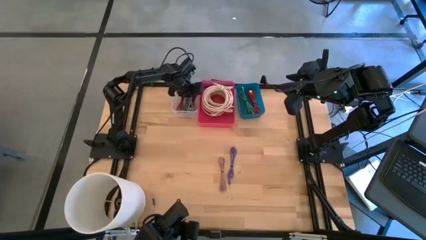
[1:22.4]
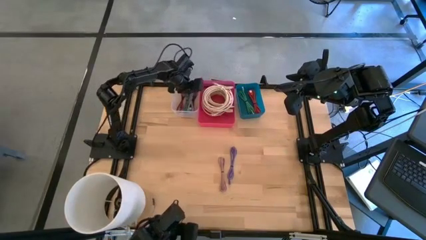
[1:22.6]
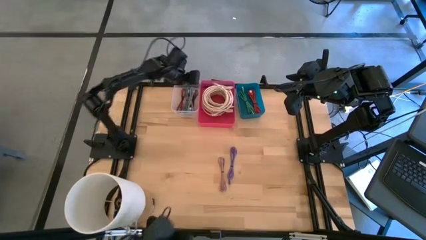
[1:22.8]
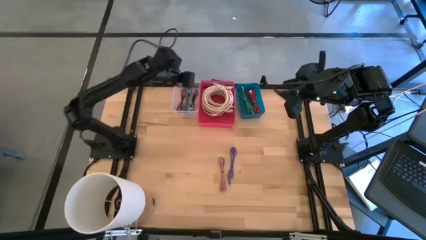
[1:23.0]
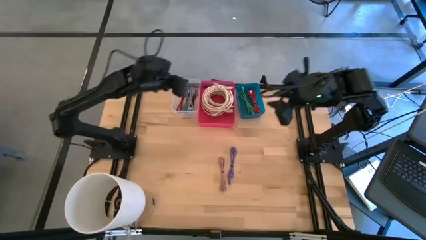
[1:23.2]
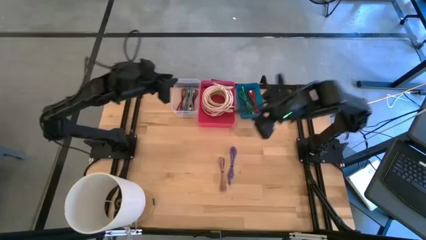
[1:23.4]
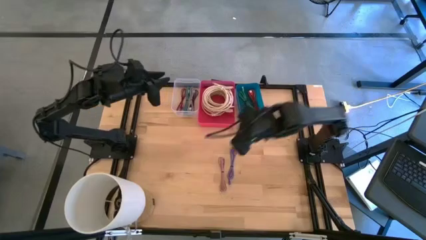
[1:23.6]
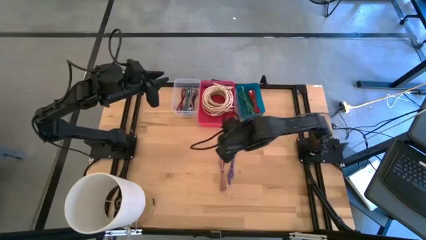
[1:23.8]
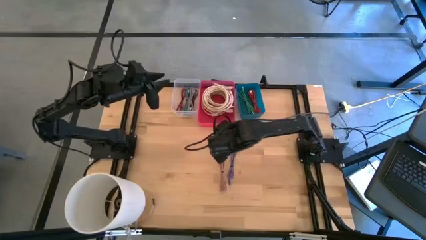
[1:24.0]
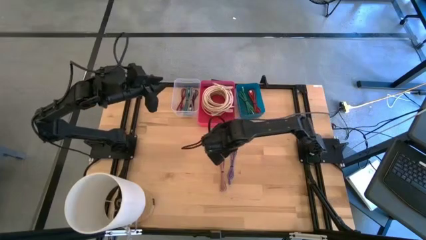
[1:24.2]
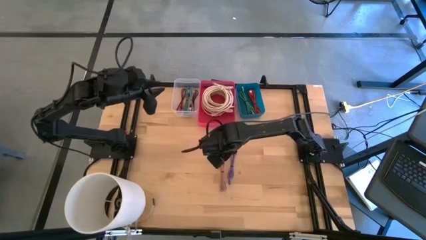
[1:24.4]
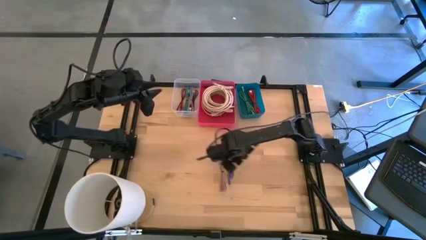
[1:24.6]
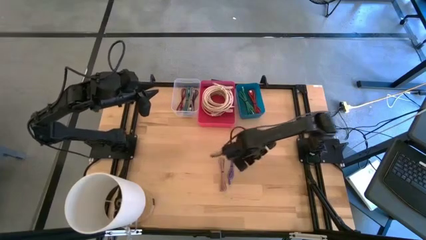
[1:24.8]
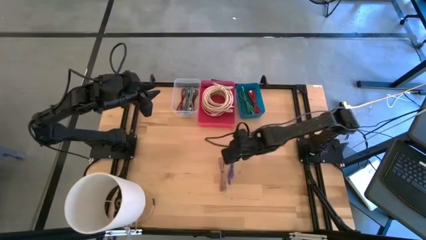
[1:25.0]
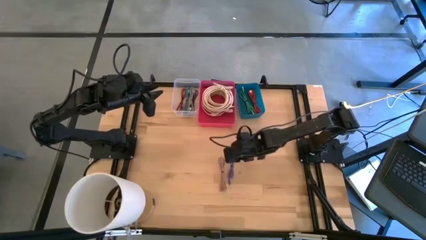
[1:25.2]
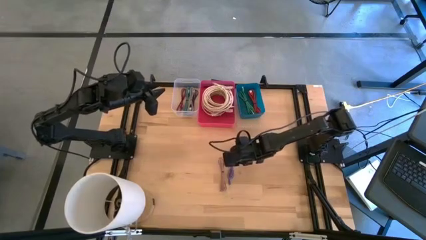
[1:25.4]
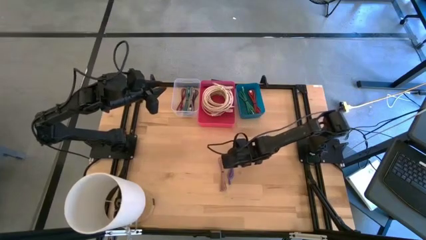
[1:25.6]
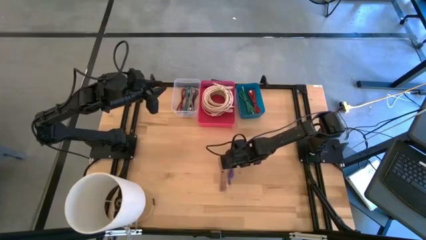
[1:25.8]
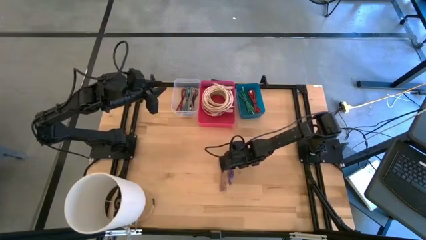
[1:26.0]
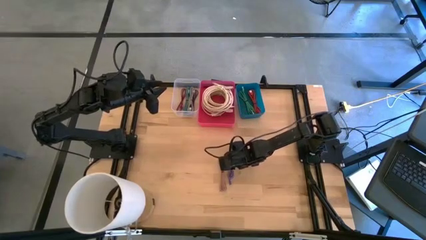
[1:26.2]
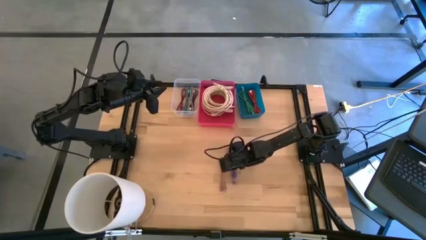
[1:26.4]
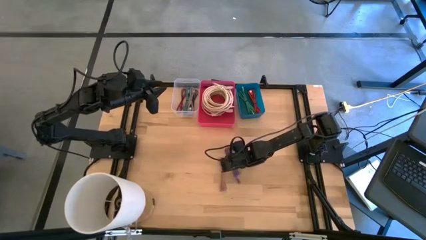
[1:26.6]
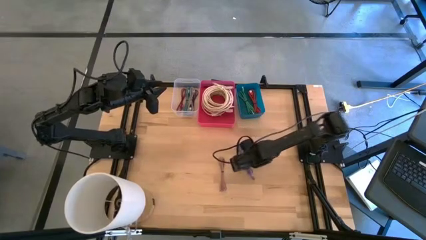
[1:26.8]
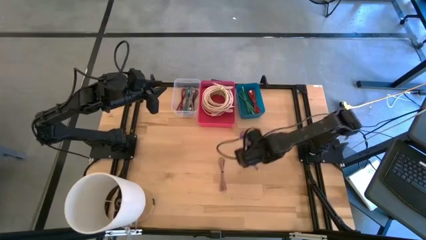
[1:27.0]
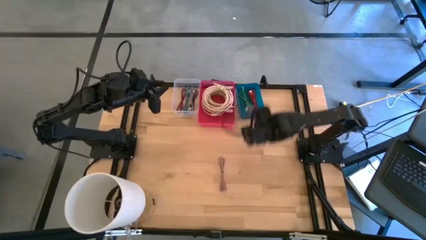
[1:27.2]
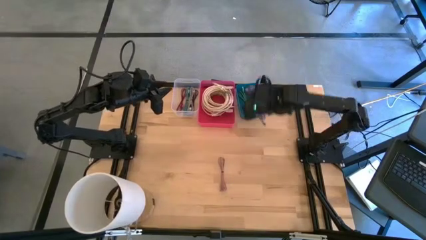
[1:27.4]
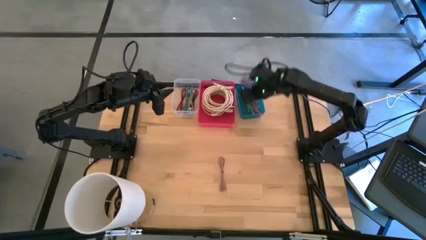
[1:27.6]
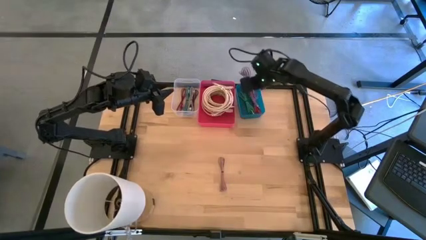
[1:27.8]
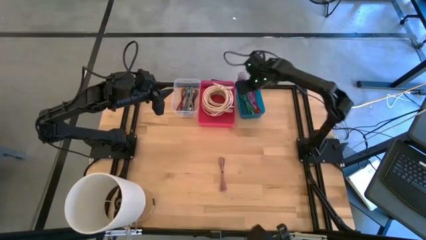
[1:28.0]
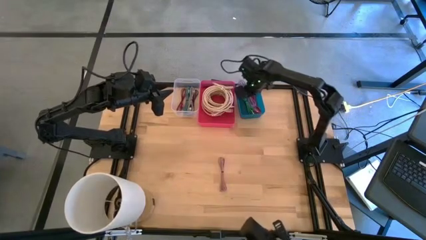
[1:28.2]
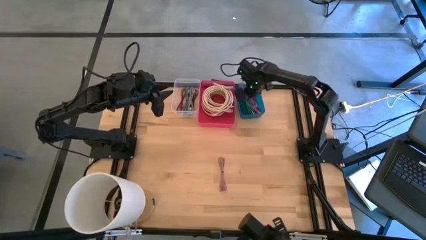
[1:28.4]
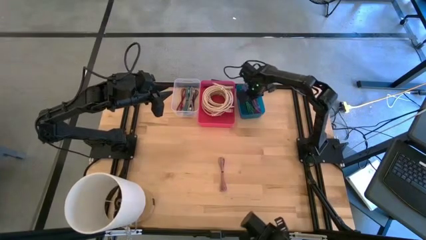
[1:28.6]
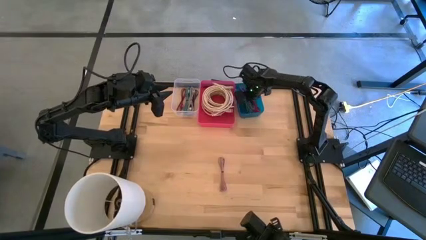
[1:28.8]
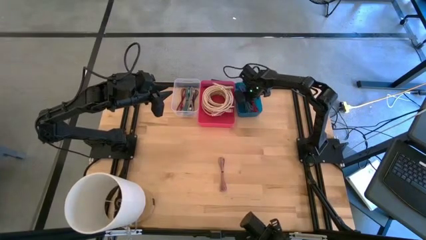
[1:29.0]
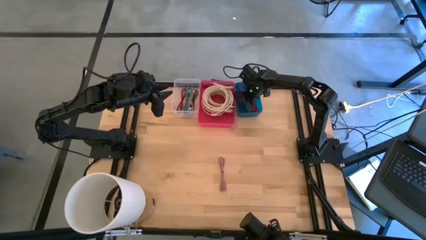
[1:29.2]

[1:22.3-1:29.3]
Task: Pick & Place USB Port
Put the purple charger cable into the blue bin

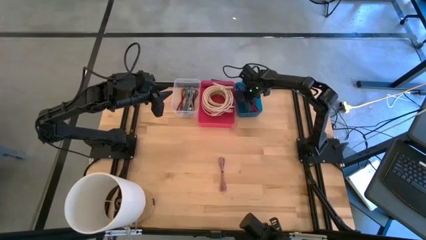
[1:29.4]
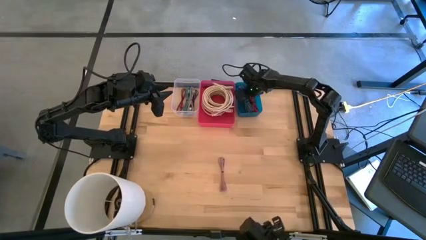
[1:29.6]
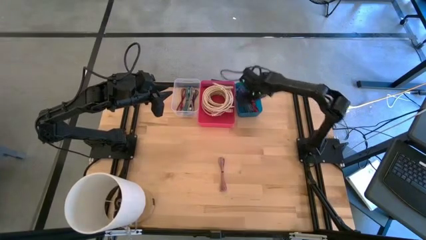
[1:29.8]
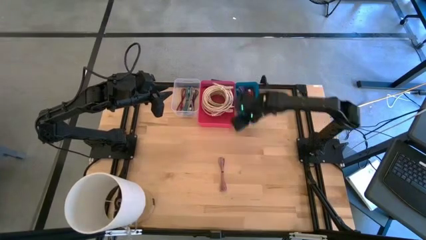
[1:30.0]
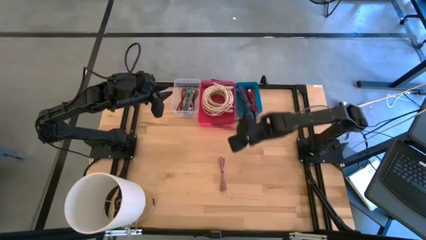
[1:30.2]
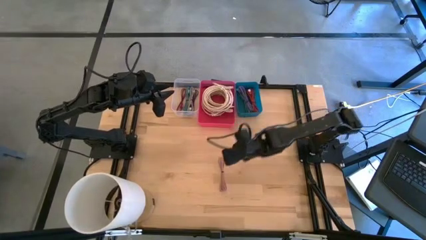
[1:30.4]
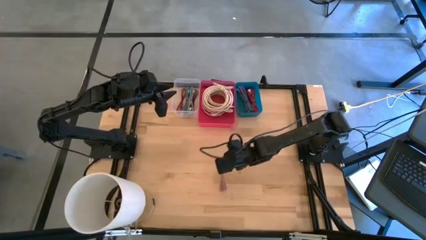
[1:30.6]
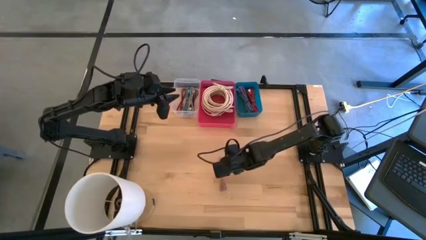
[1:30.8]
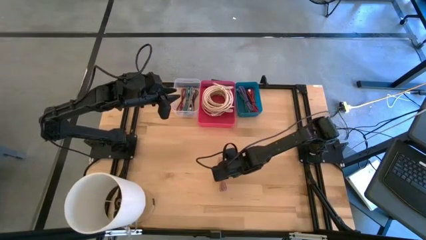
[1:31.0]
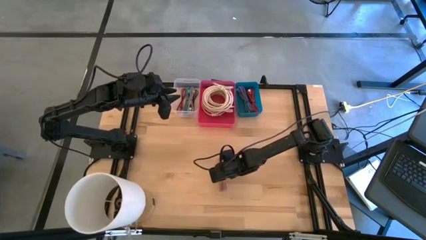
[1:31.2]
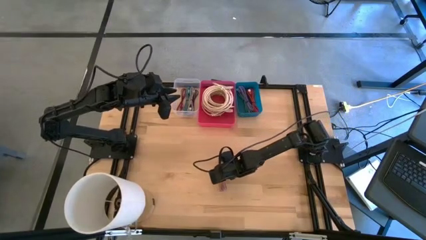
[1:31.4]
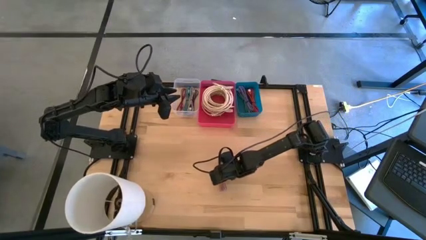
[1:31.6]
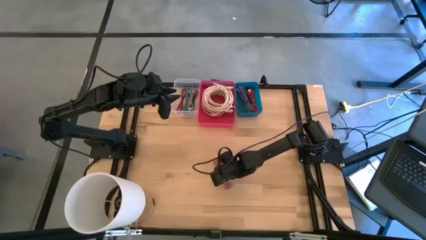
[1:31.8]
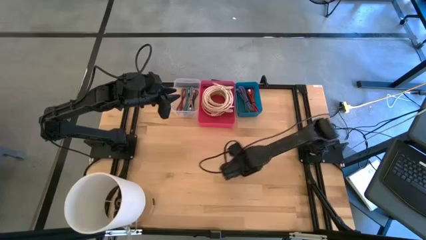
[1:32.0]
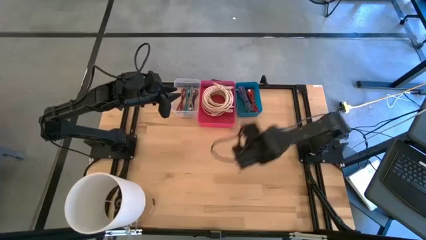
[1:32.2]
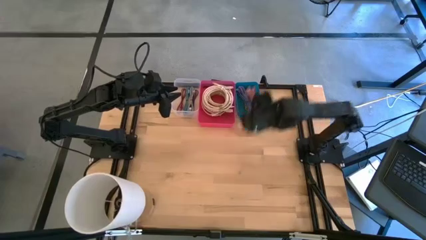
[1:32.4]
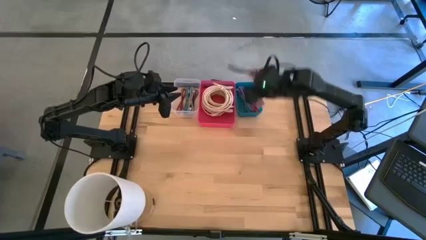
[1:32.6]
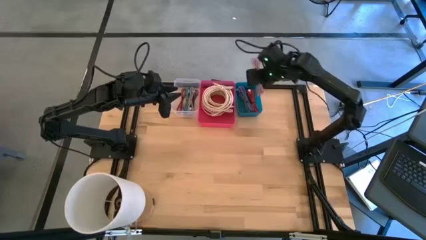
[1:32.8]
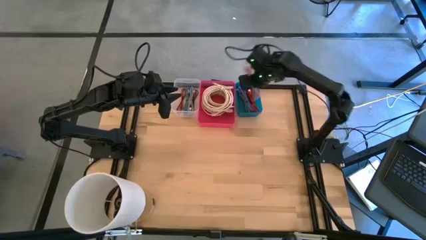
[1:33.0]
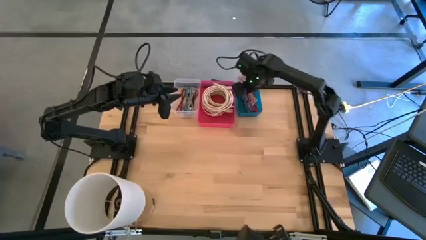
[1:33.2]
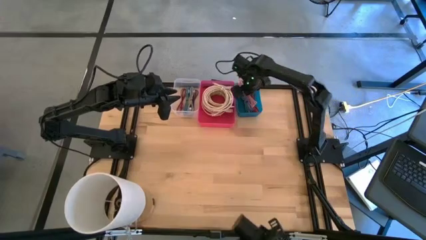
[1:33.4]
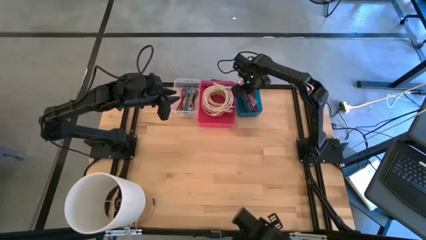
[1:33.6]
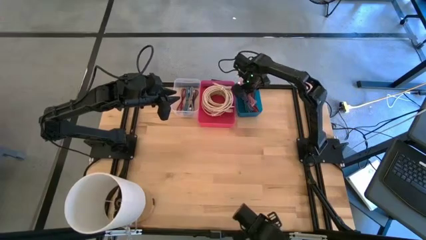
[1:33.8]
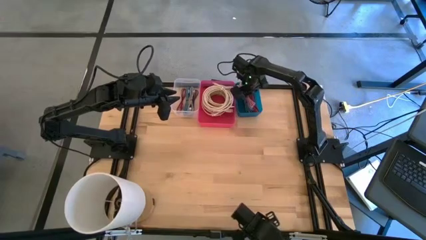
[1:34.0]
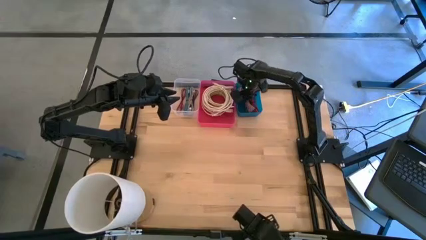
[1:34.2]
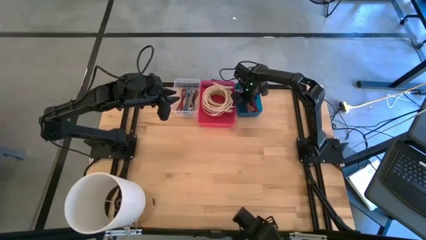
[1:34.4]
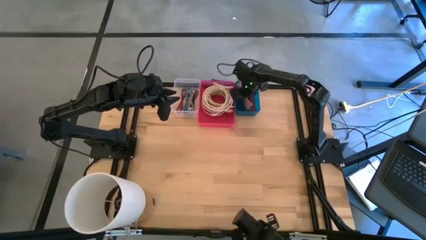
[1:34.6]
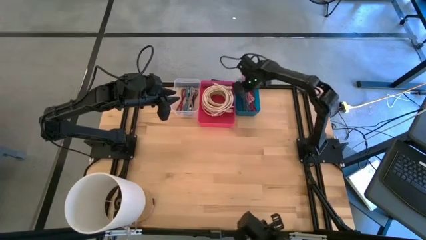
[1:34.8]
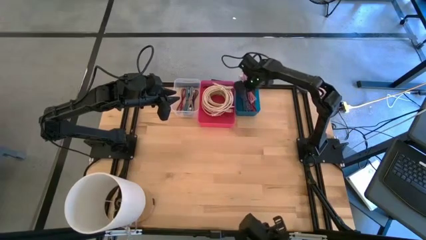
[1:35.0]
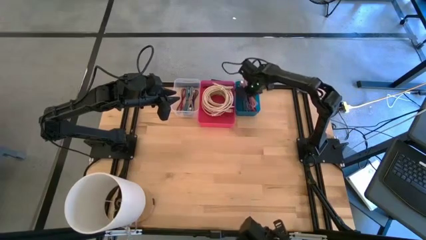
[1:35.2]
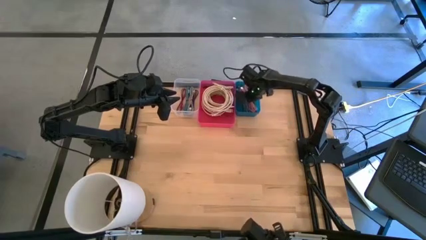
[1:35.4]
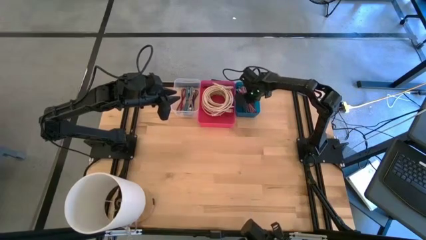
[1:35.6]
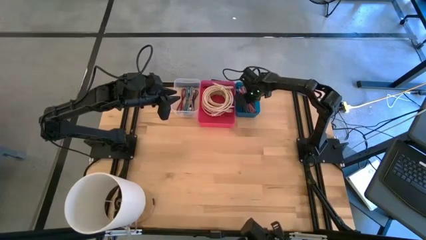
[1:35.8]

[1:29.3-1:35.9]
Put the pink charger cable into the blue bin

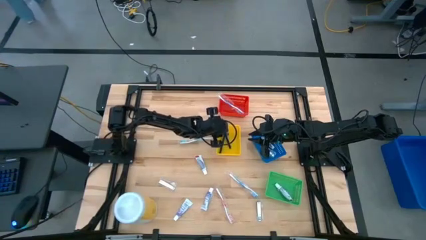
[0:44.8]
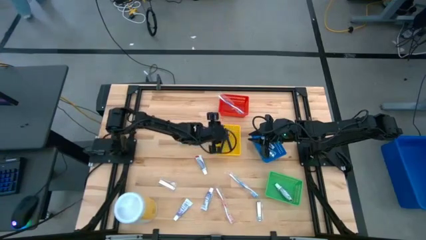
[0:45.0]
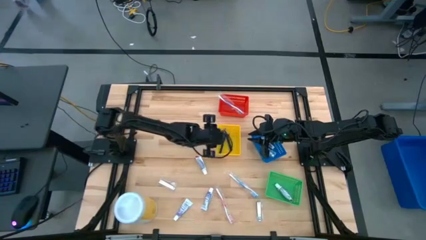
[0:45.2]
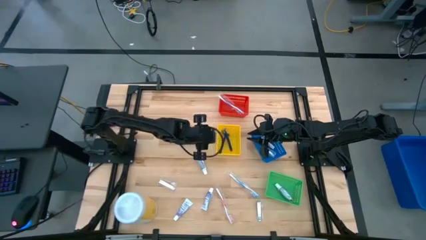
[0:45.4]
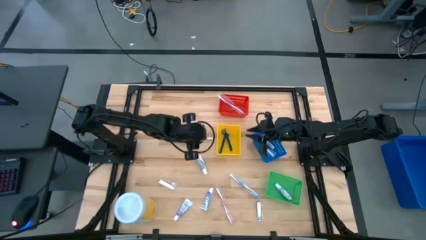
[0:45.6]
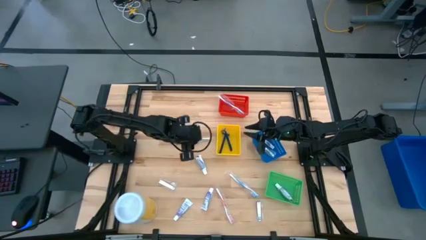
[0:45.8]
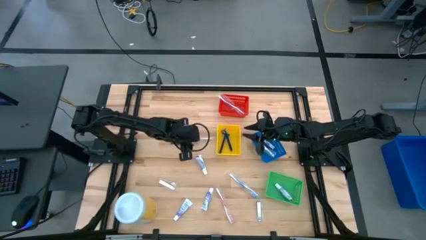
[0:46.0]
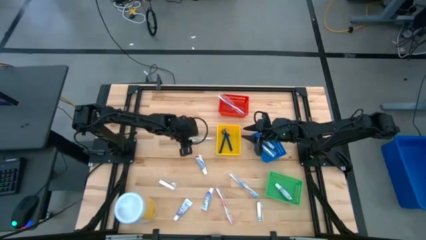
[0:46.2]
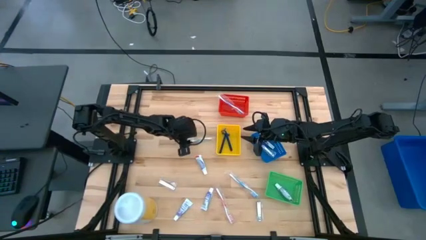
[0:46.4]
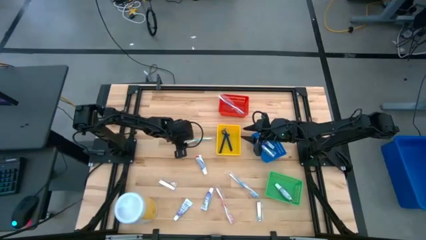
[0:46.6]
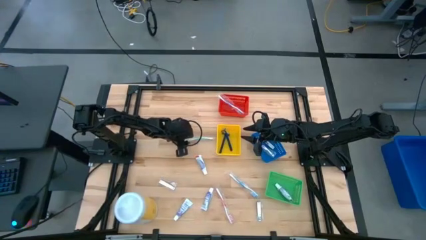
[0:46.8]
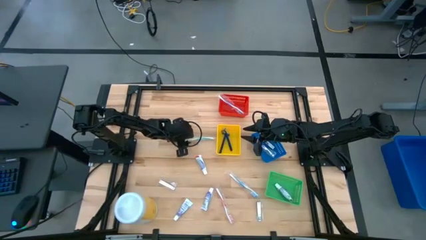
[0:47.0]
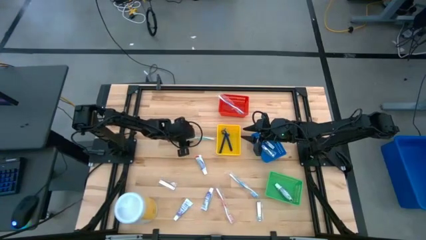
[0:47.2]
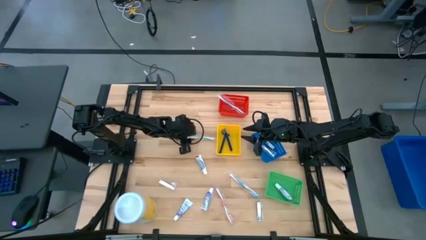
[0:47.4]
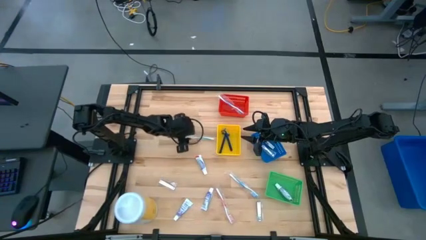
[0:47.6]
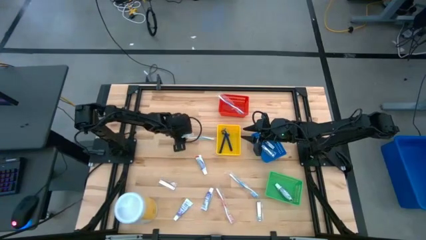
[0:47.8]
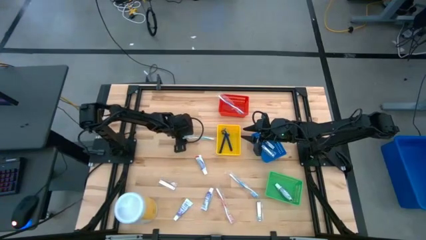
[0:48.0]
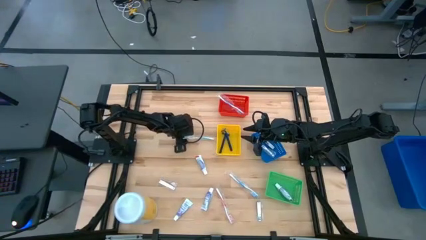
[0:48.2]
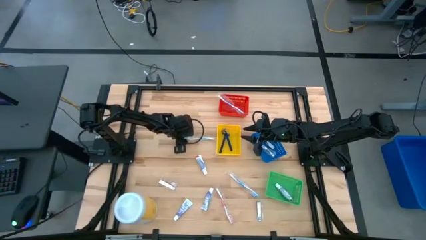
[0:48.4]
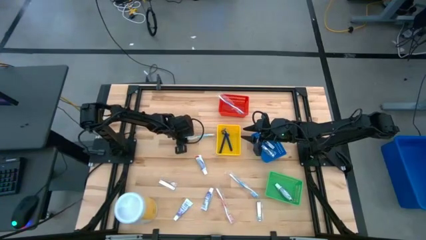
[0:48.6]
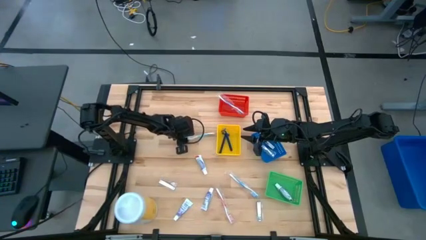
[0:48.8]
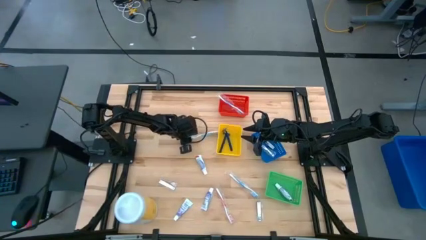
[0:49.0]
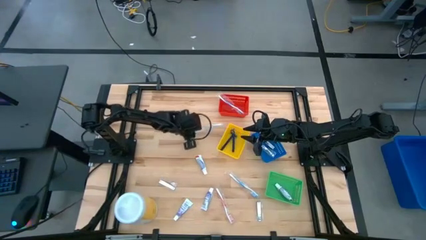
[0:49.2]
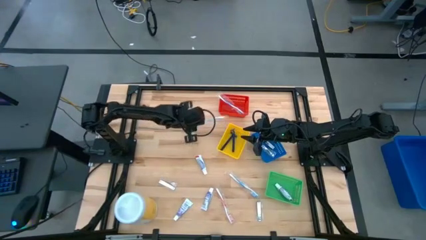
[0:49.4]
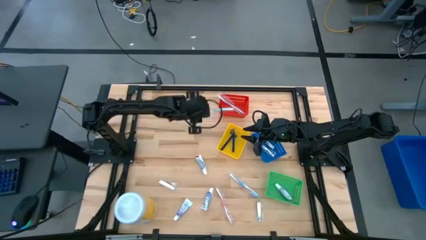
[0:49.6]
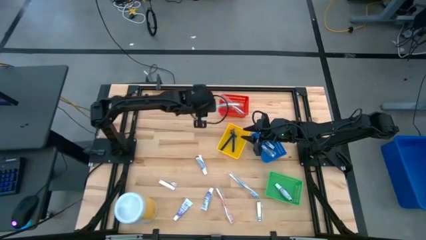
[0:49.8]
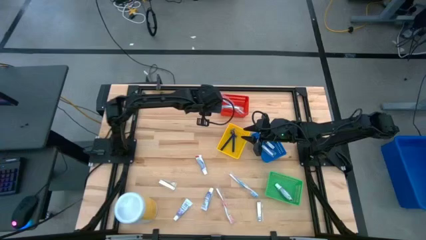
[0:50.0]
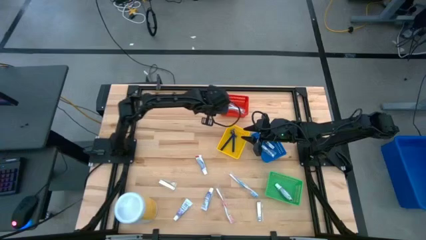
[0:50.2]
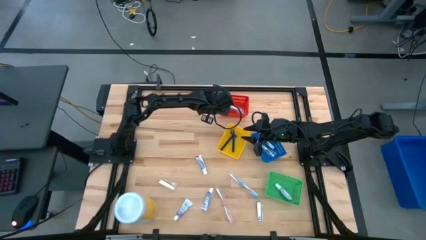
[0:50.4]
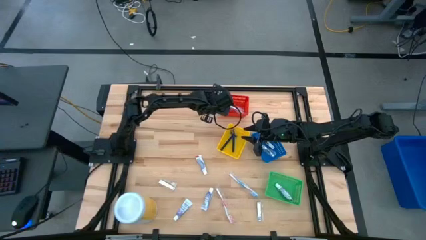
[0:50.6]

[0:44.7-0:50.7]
Task: Pick & Place Travel size toiletries
Put the green toothbrush into the red bin
